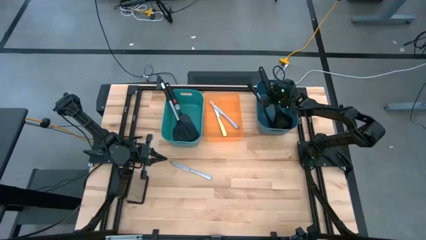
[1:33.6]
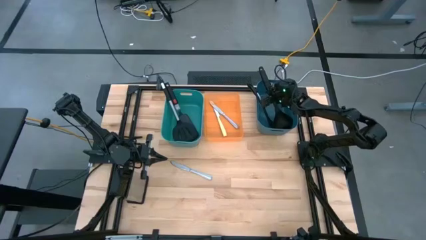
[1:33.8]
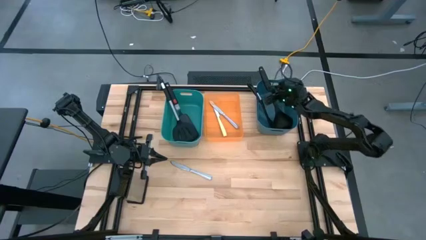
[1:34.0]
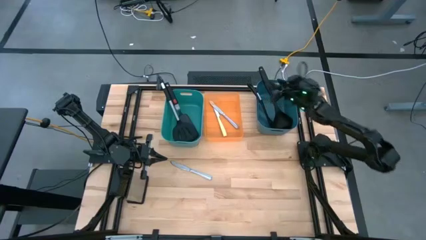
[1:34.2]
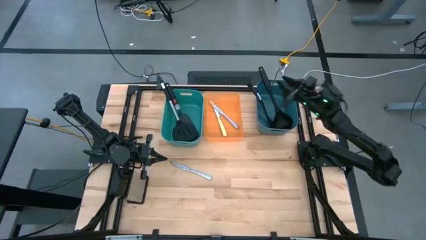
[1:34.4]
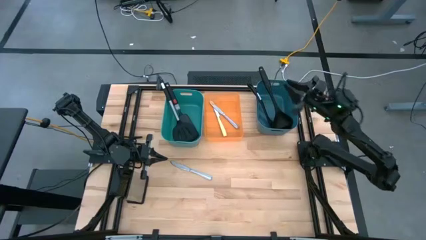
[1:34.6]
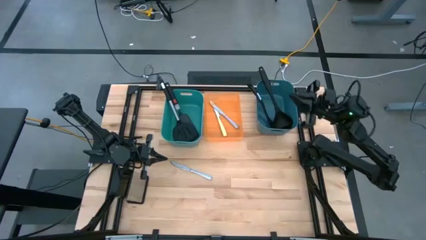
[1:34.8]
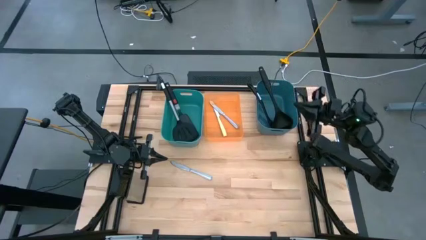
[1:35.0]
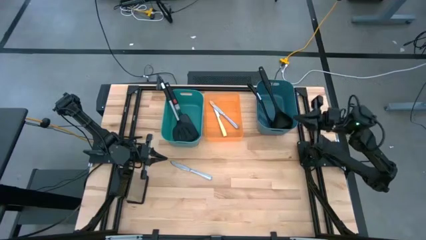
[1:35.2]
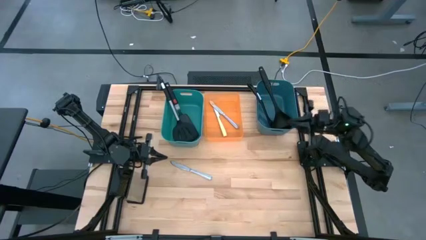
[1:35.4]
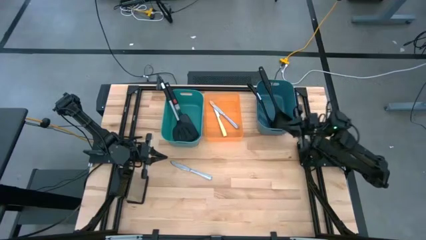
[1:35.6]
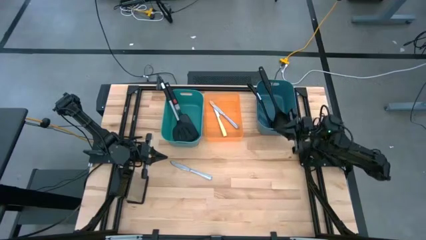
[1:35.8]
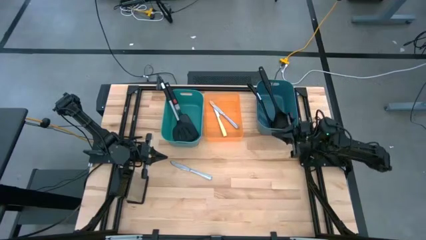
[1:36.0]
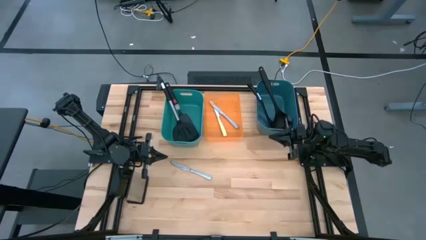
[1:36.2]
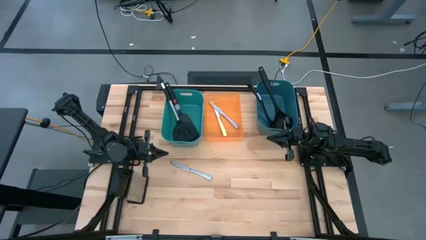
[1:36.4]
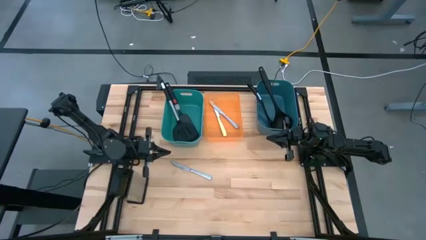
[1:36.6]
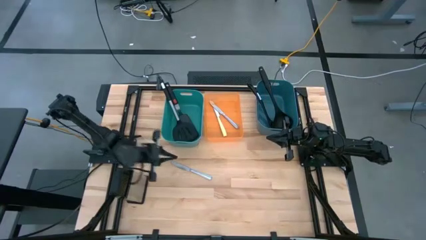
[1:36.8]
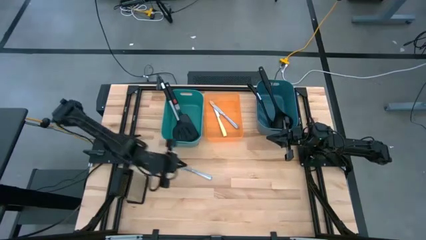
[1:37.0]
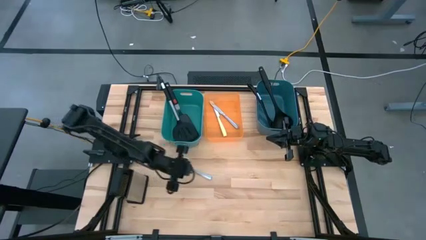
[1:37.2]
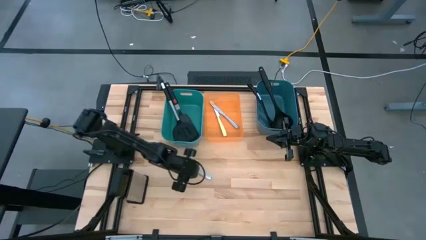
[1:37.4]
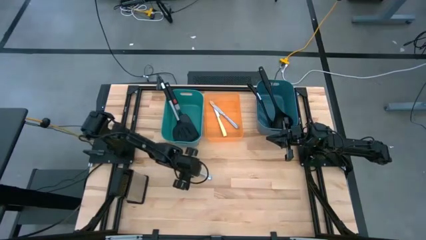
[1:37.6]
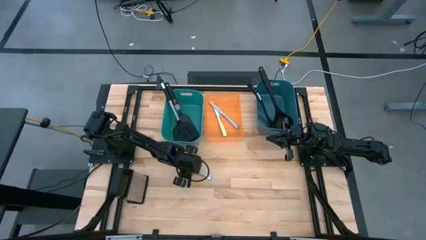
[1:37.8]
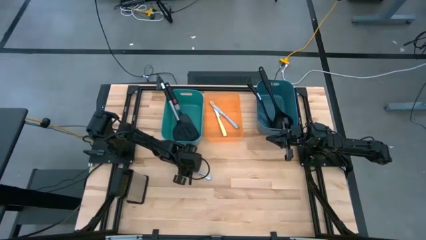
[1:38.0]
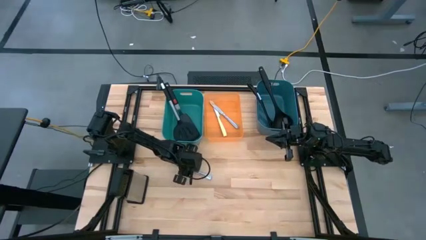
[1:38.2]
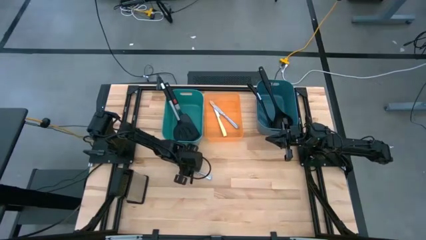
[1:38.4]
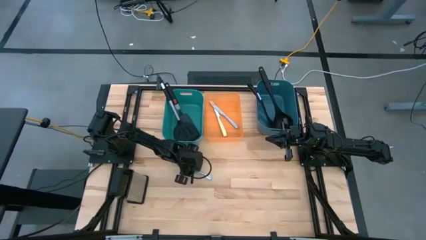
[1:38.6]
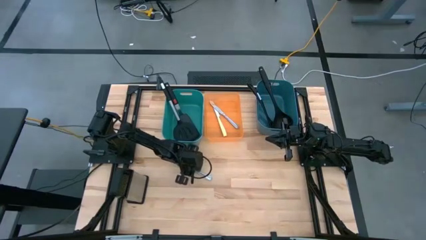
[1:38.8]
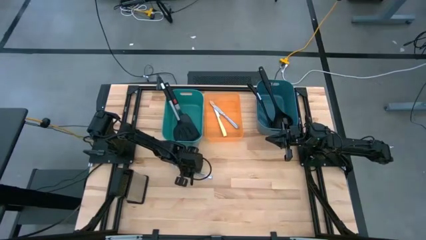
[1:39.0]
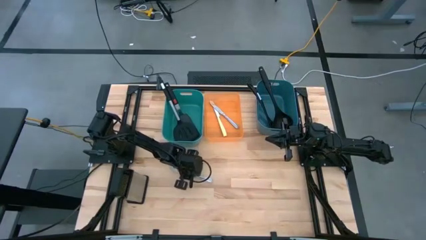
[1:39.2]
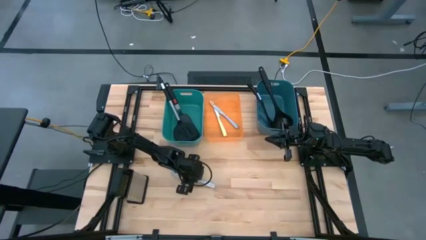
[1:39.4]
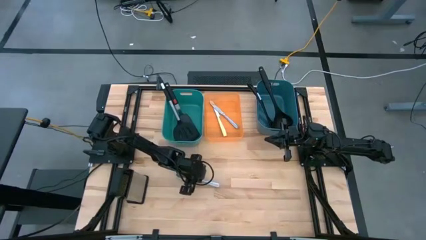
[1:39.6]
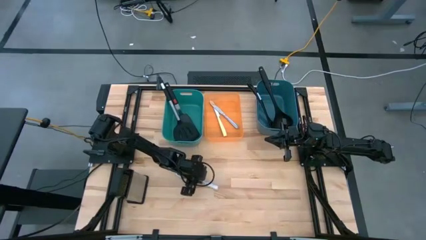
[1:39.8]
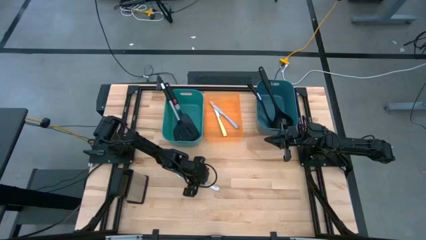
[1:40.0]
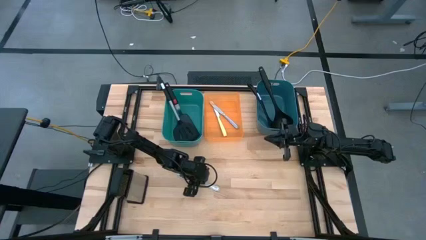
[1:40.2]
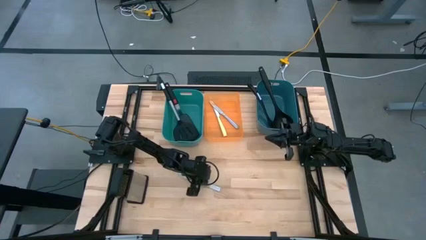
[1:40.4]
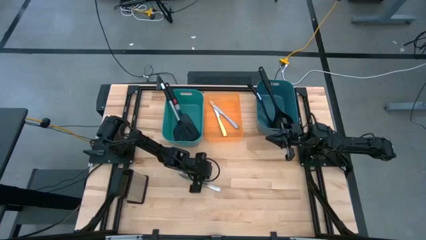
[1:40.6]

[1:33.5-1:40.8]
Task: Pick & Place Kitchen Items
Put the silver knife into the orange bin

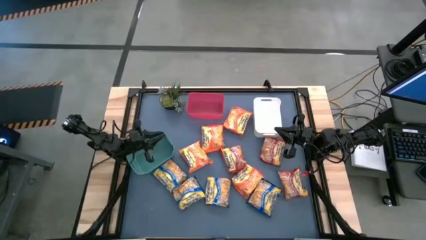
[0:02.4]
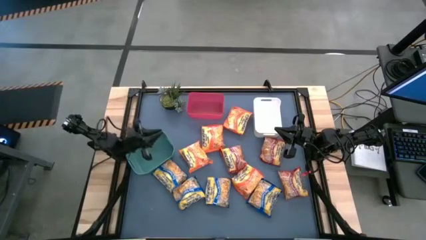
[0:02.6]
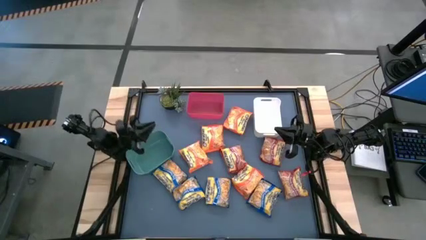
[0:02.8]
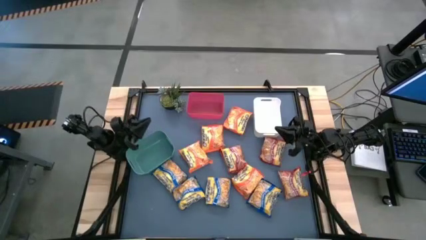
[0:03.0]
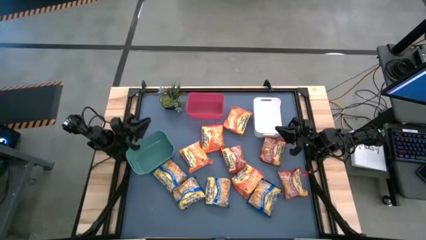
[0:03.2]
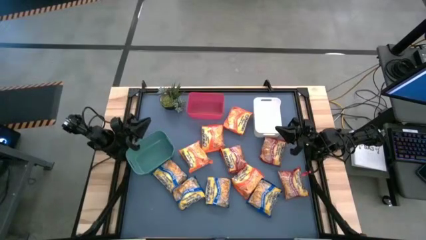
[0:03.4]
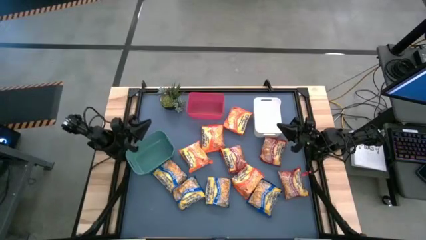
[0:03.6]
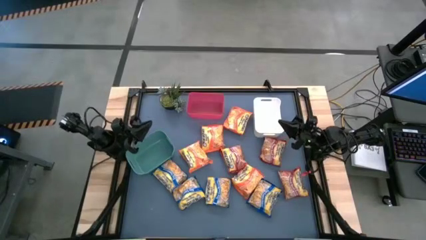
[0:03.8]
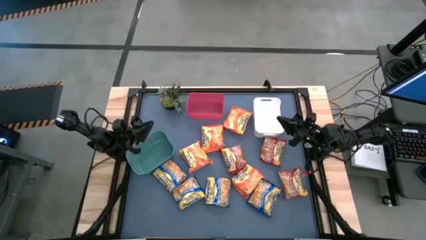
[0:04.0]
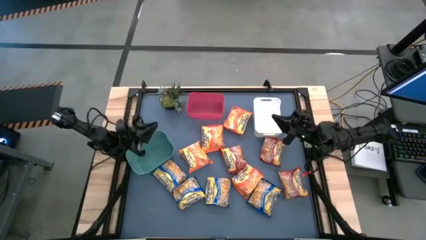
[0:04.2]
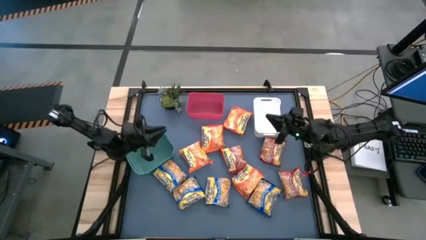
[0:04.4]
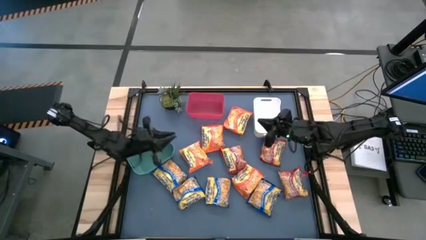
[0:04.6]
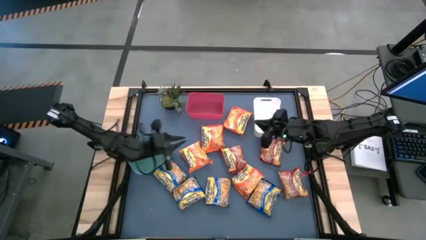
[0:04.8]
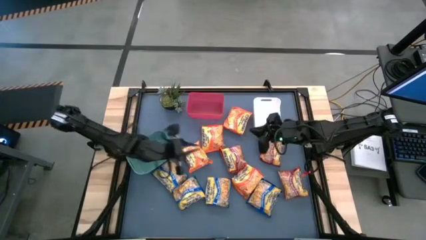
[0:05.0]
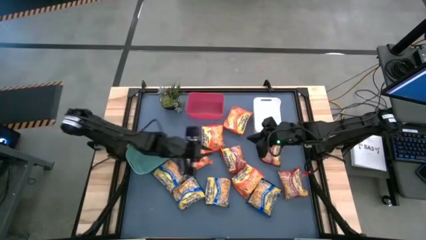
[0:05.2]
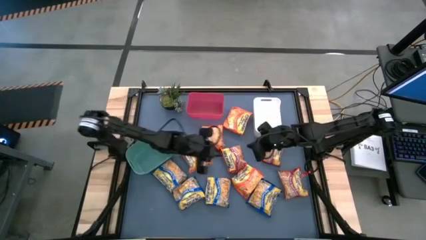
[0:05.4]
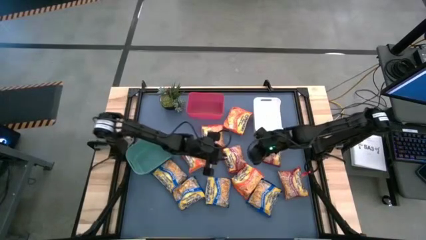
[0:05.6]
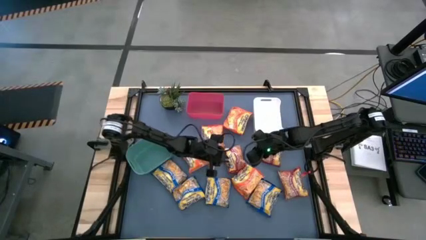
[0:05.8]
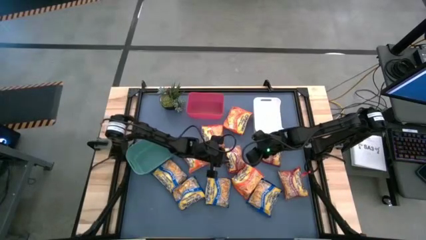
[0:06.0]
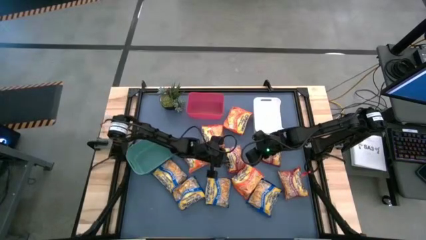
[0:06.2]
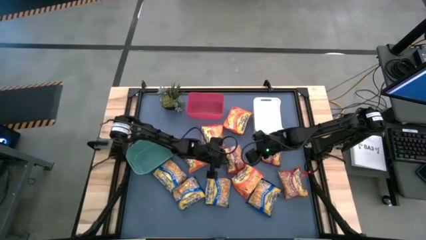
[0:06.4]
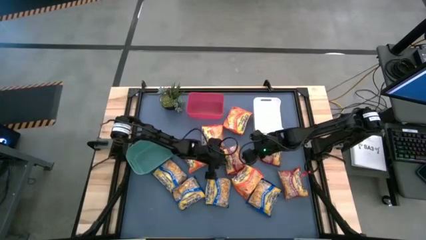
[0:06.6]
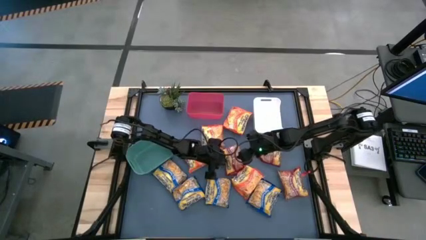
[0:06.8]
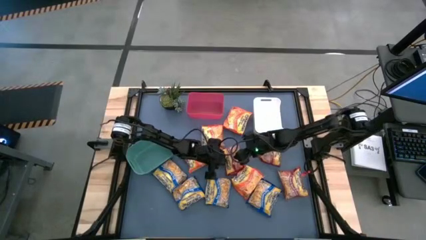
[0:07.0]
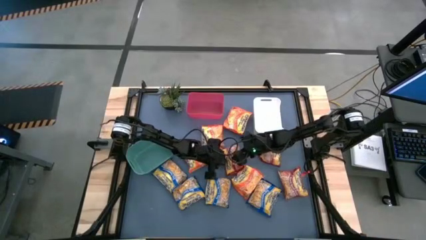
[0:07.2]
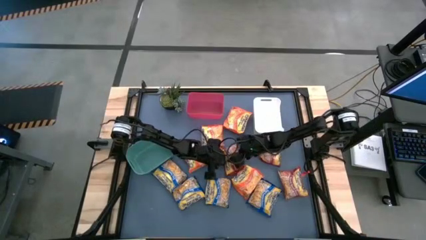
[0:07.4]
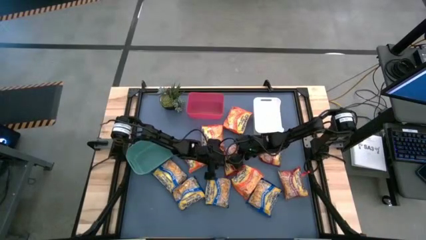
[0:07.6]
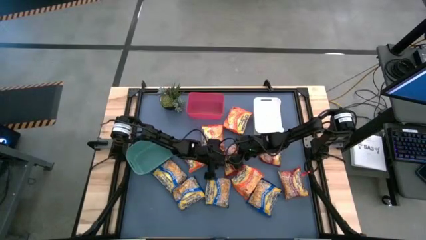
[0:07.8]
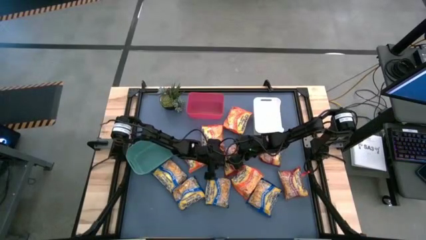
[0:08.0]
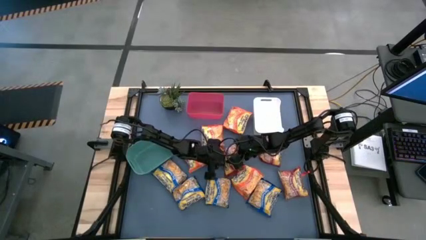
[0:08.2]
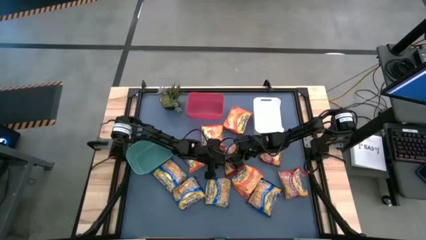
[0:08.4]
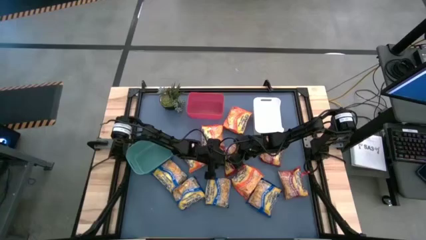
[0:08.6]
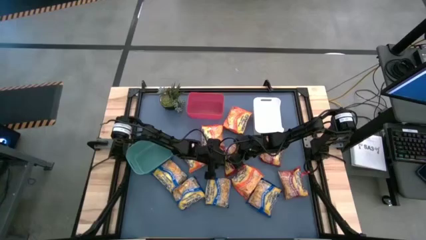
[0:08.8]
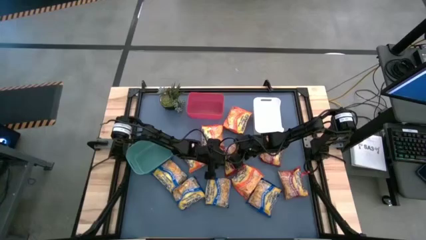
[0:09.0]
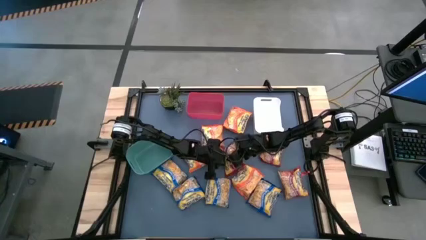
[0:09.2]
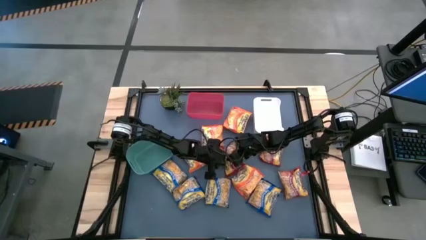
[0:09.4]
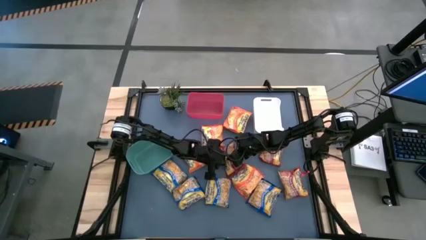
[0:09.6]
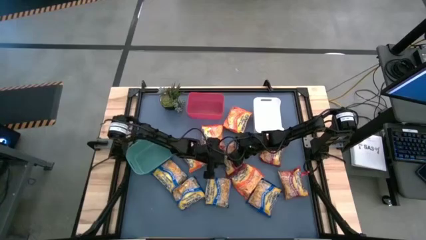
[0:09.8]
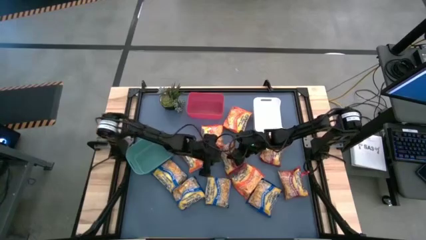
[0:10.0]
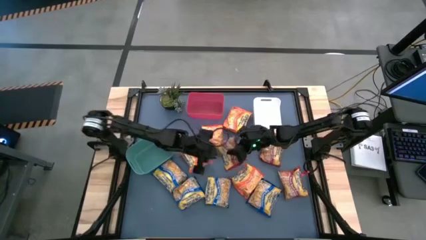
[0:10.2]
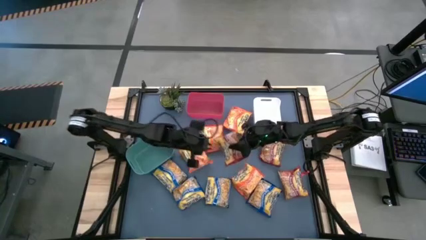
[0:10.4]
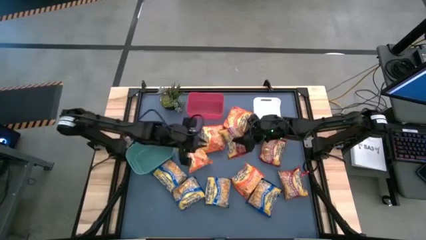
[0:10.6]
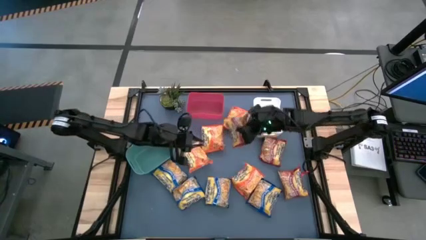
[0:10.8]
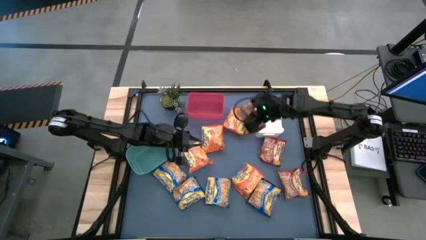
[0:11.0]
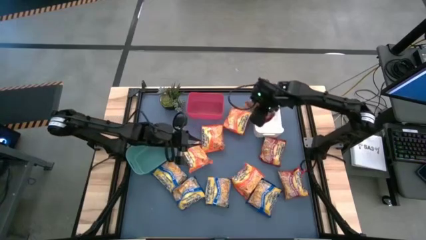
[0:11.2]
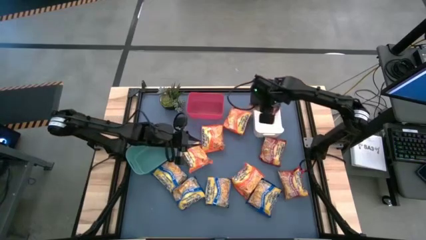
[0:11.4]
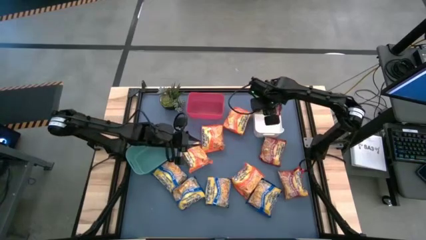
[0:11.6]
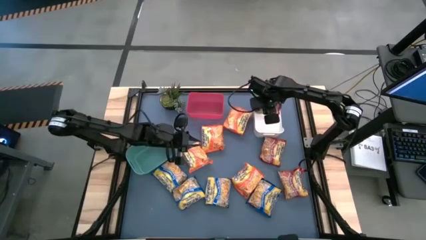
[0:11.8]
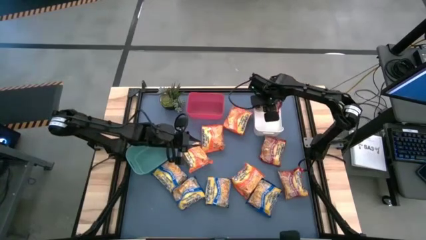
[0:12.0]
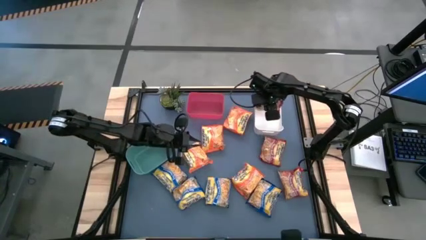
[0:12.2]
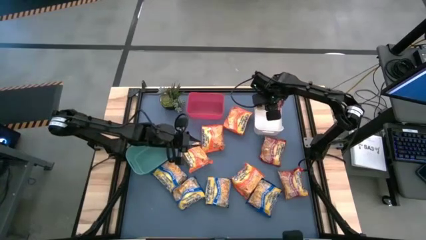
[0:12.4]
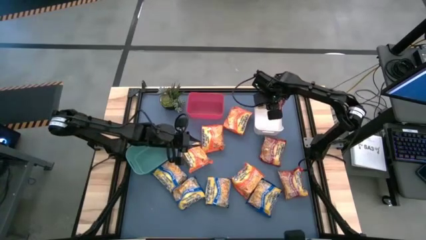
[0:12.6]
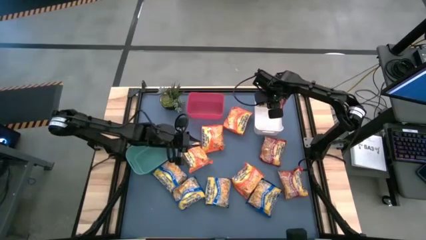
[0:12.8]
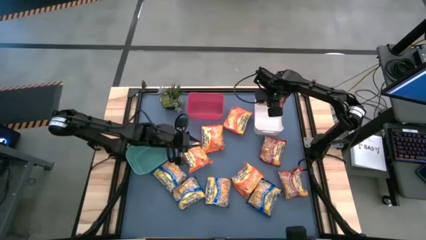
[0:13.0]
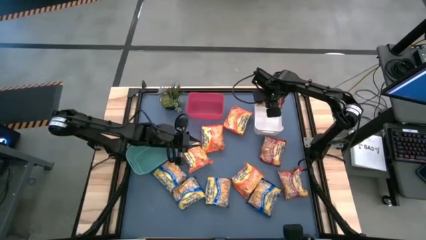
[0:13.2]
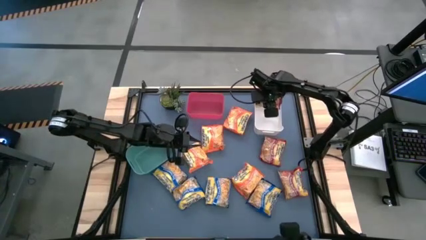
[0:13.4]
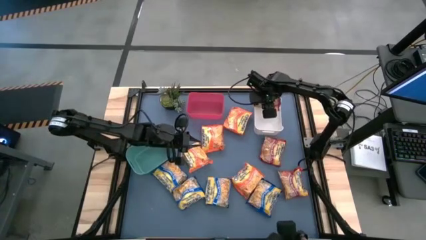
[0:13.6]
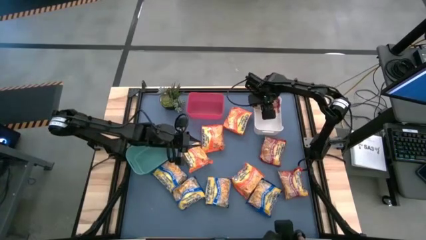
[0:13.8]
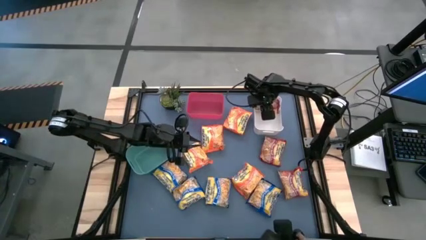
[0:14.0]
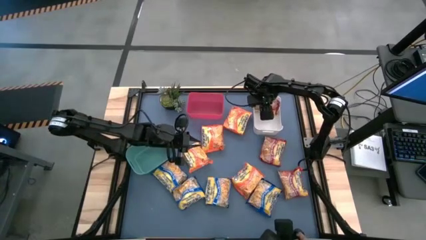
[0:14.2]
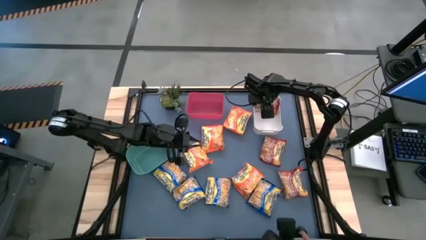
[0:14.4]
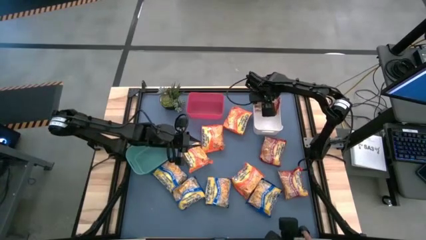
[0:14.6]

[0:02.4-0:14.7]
Task: Sort Maruchan noodles
Put the red noodle pack into the white bin
